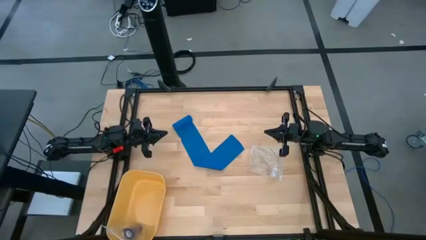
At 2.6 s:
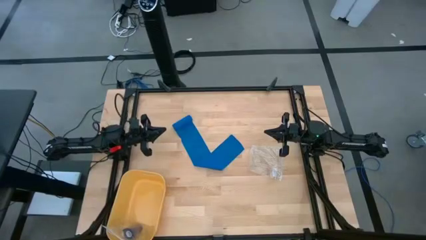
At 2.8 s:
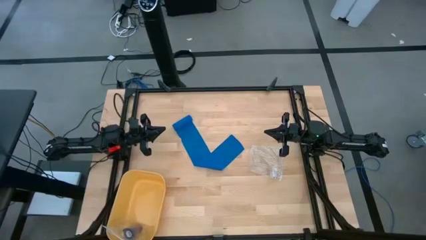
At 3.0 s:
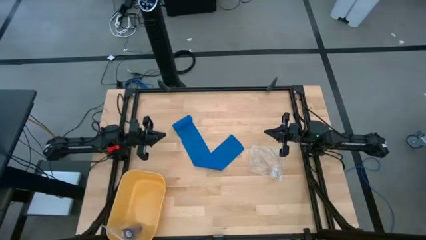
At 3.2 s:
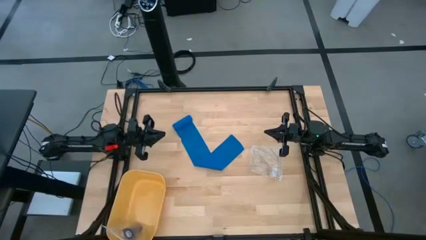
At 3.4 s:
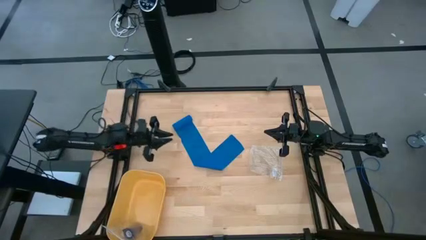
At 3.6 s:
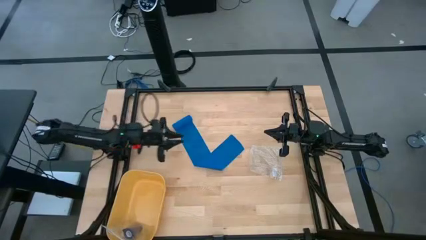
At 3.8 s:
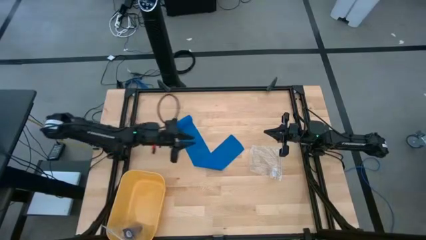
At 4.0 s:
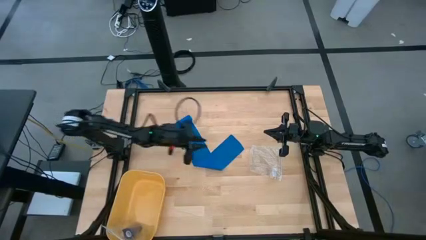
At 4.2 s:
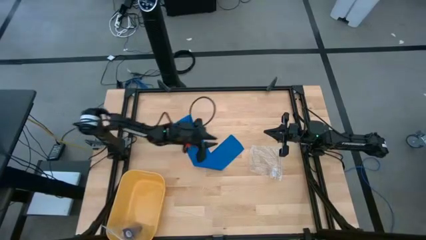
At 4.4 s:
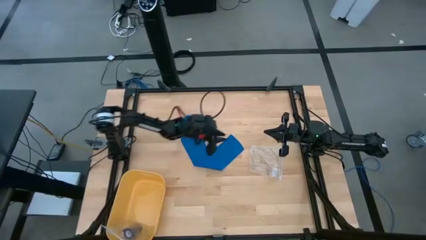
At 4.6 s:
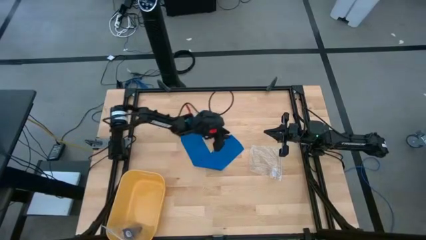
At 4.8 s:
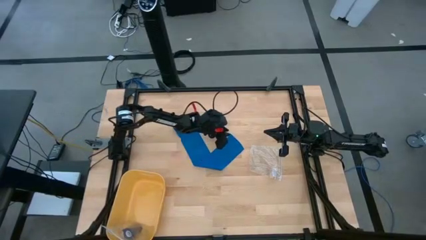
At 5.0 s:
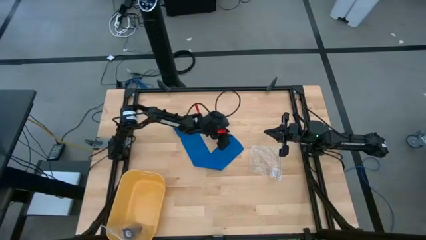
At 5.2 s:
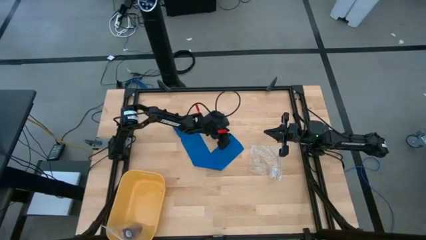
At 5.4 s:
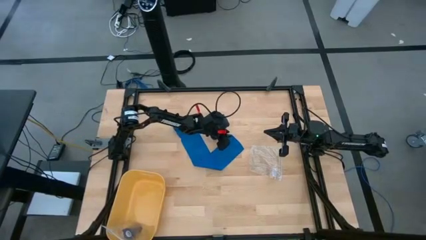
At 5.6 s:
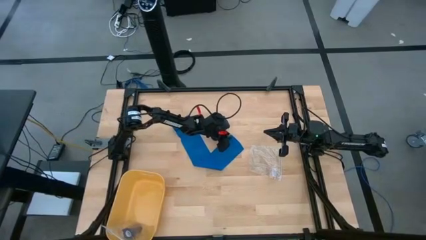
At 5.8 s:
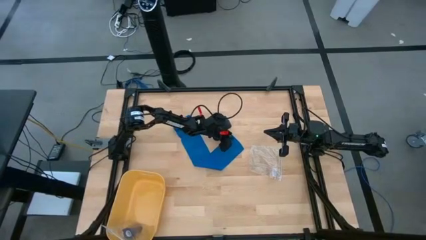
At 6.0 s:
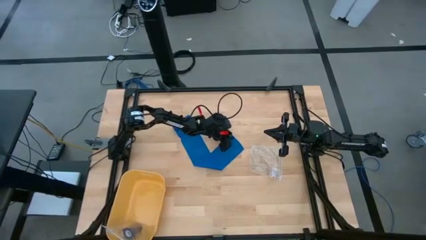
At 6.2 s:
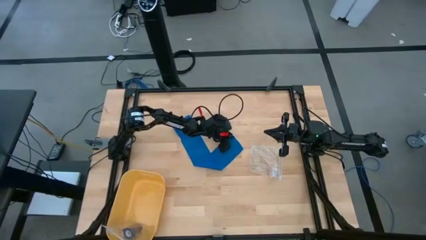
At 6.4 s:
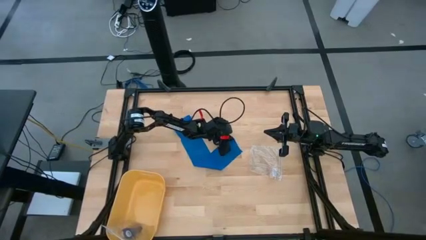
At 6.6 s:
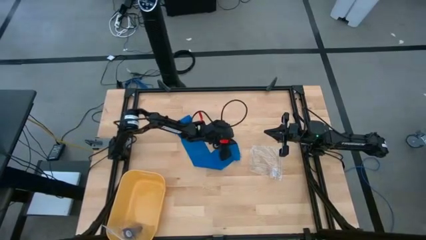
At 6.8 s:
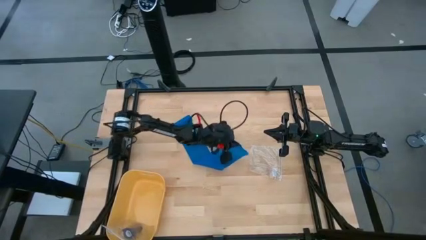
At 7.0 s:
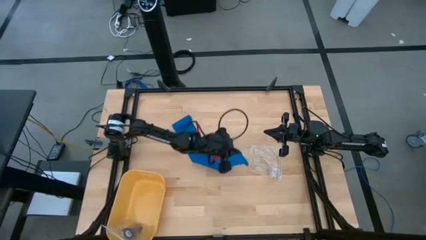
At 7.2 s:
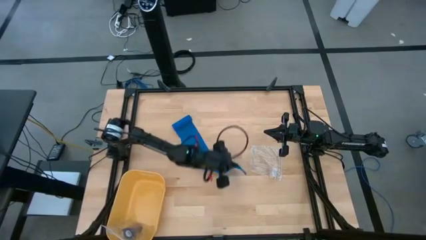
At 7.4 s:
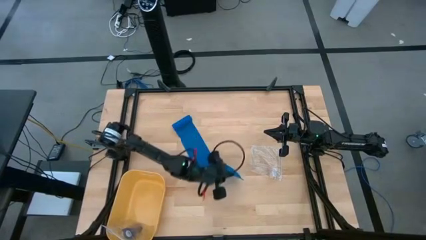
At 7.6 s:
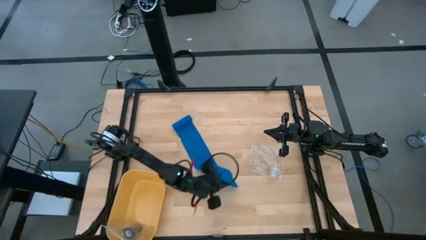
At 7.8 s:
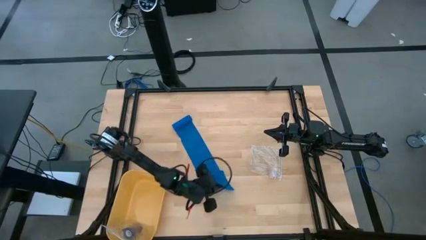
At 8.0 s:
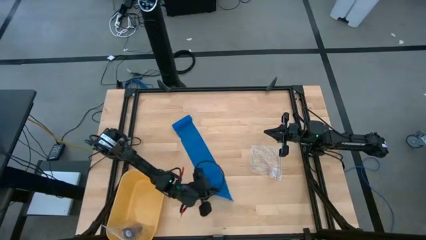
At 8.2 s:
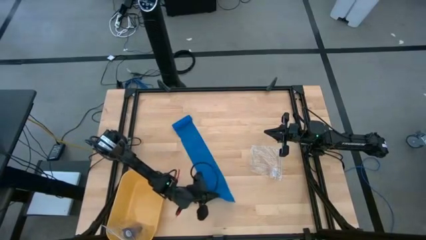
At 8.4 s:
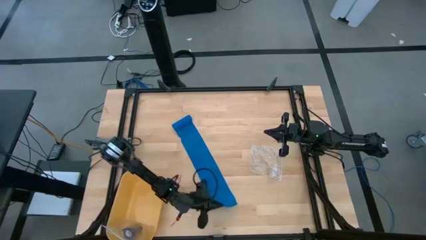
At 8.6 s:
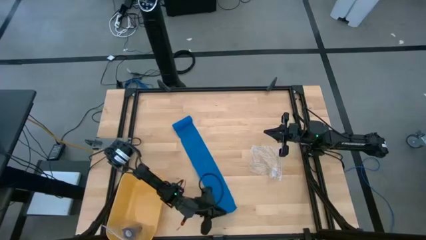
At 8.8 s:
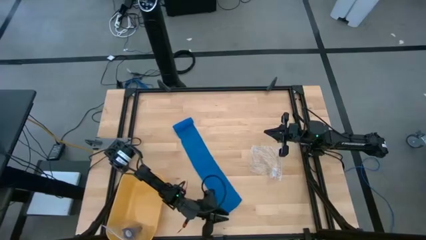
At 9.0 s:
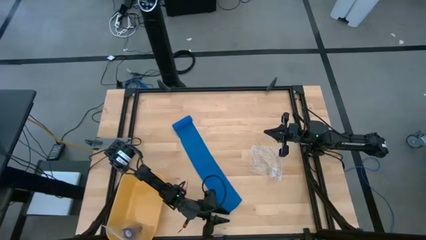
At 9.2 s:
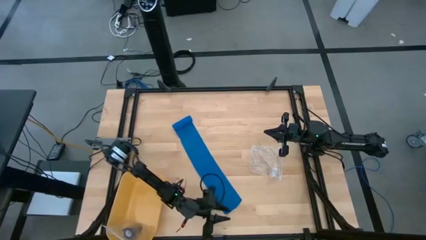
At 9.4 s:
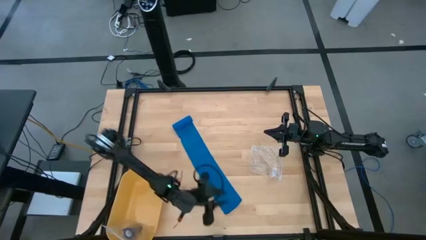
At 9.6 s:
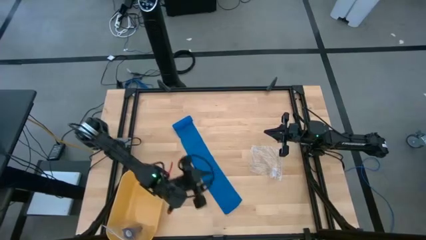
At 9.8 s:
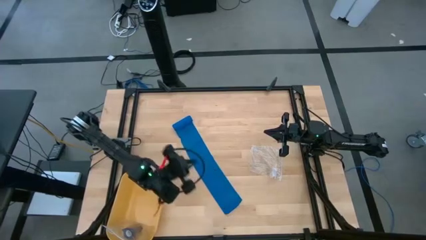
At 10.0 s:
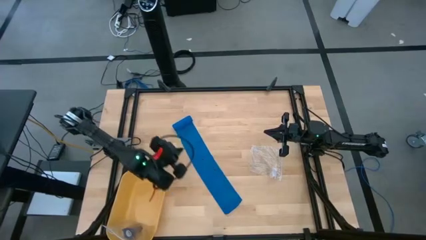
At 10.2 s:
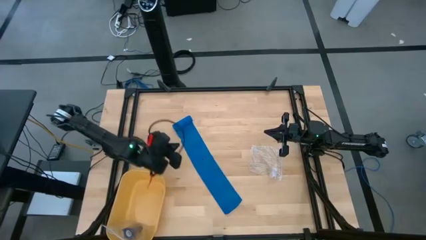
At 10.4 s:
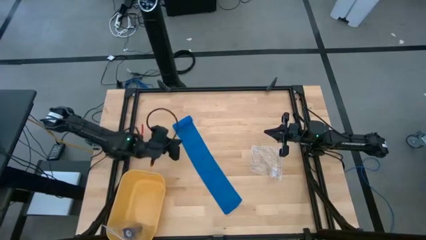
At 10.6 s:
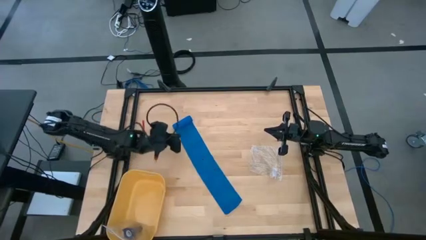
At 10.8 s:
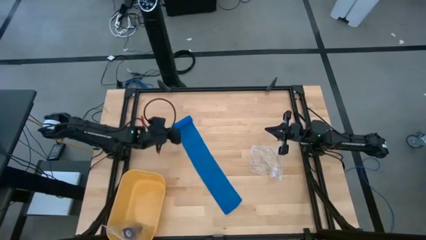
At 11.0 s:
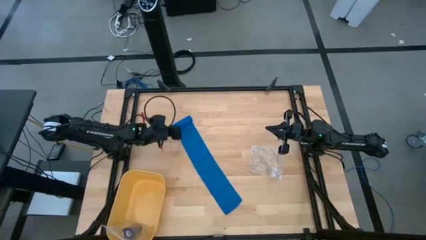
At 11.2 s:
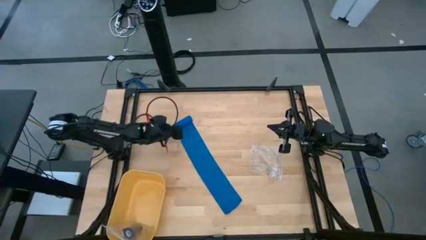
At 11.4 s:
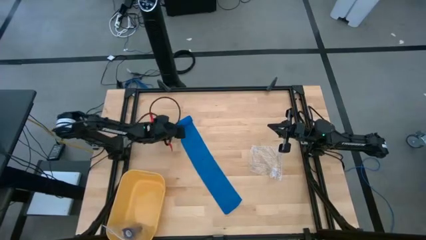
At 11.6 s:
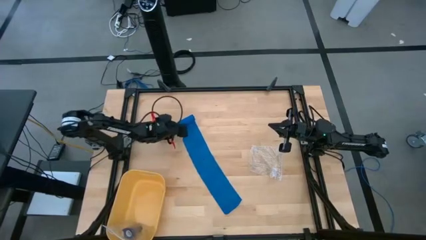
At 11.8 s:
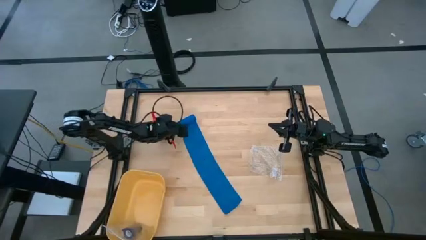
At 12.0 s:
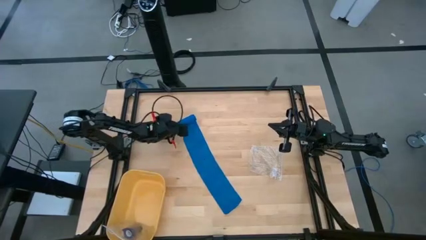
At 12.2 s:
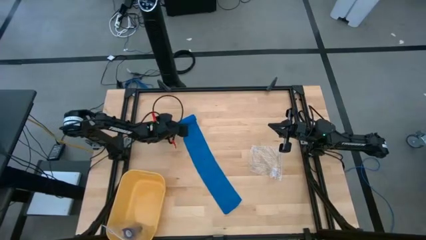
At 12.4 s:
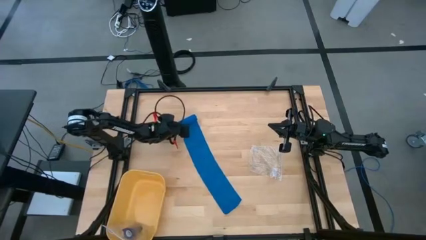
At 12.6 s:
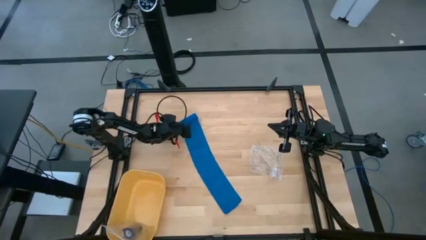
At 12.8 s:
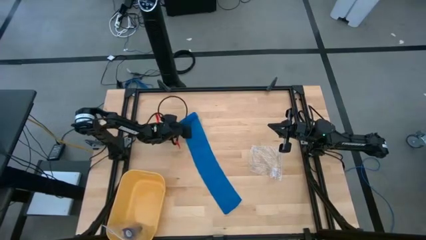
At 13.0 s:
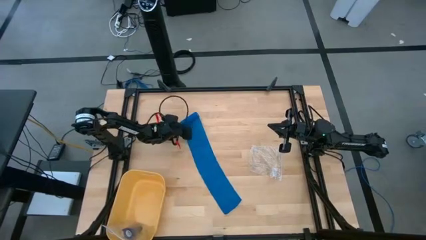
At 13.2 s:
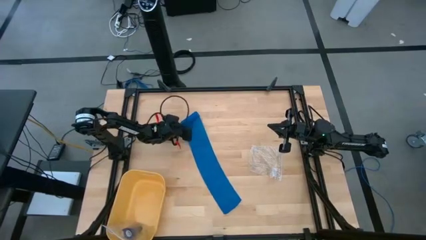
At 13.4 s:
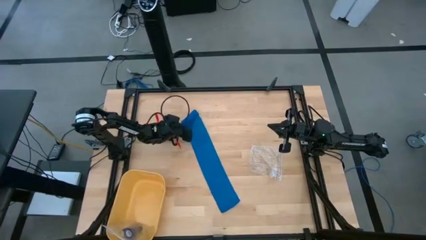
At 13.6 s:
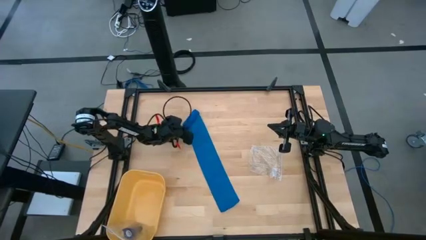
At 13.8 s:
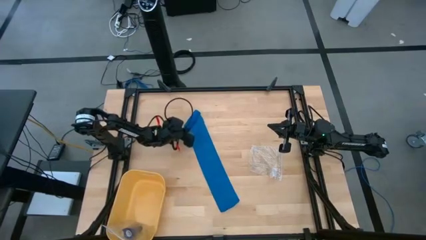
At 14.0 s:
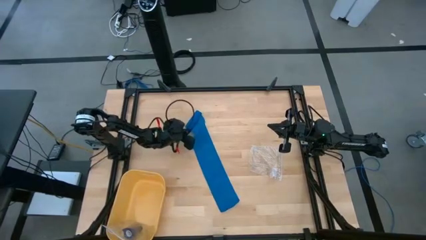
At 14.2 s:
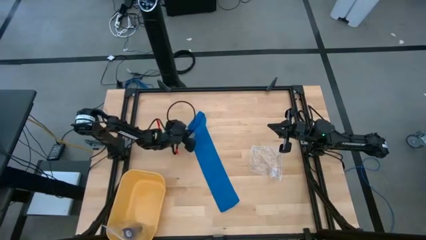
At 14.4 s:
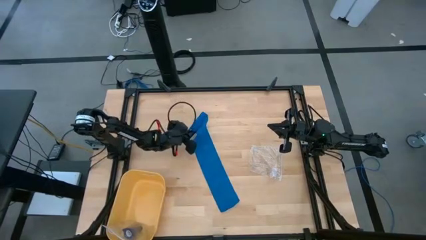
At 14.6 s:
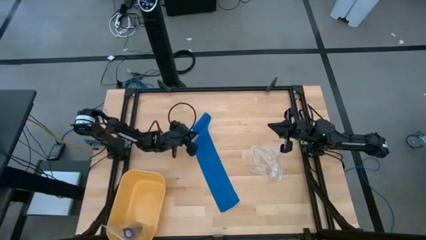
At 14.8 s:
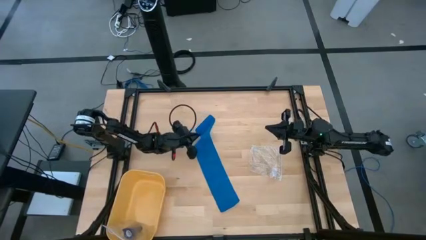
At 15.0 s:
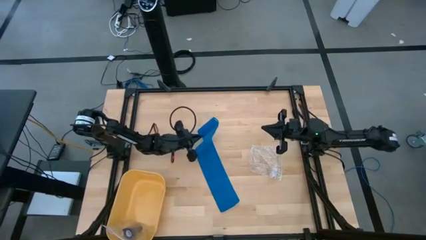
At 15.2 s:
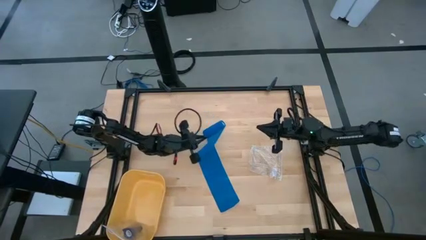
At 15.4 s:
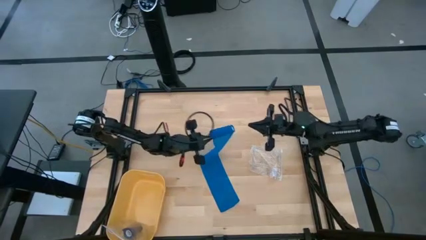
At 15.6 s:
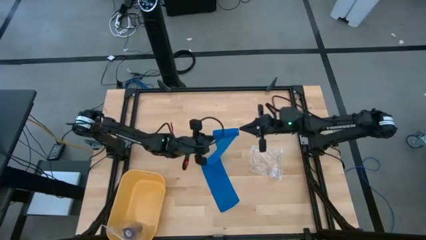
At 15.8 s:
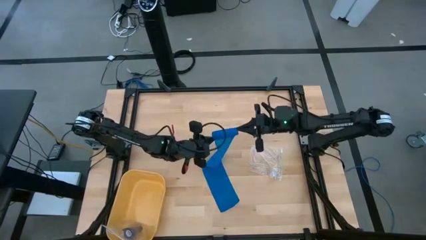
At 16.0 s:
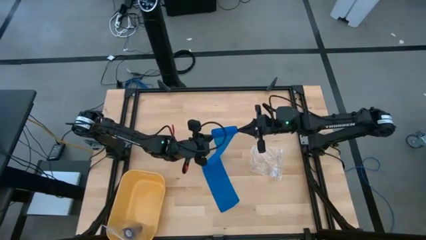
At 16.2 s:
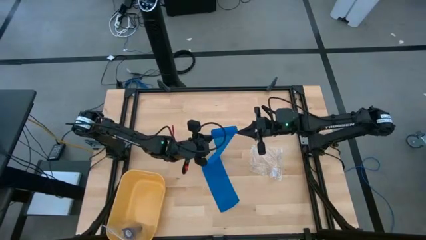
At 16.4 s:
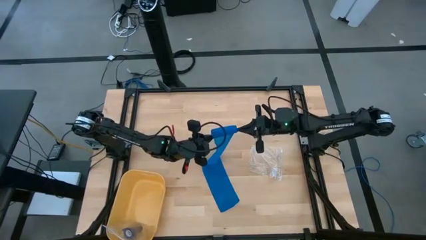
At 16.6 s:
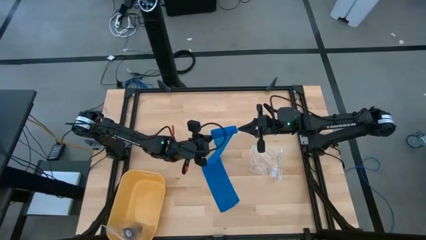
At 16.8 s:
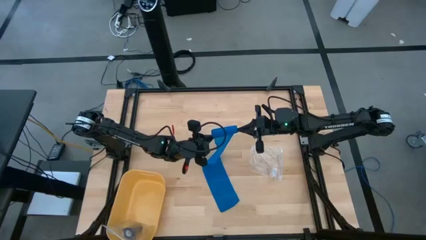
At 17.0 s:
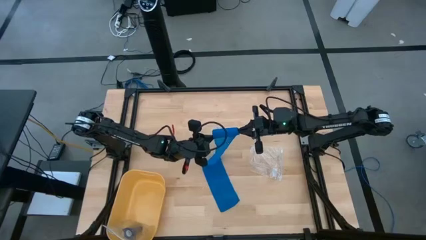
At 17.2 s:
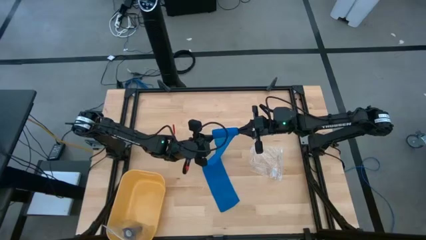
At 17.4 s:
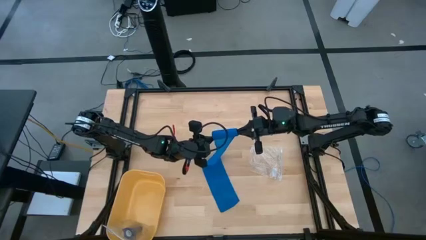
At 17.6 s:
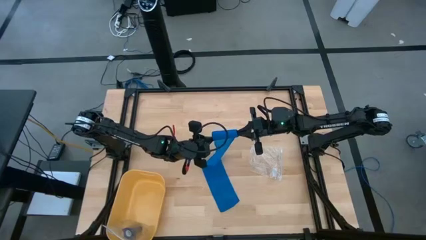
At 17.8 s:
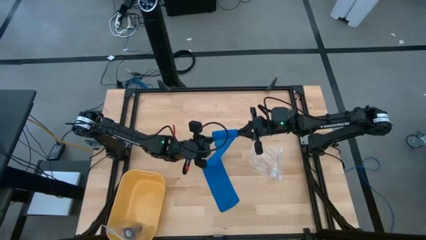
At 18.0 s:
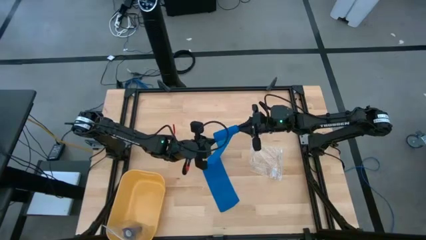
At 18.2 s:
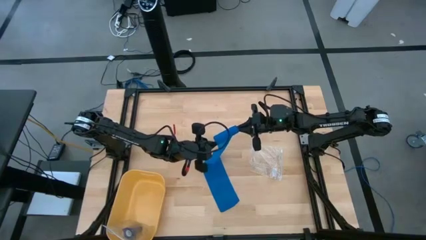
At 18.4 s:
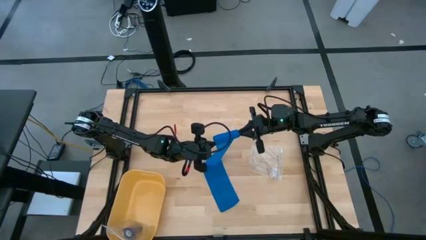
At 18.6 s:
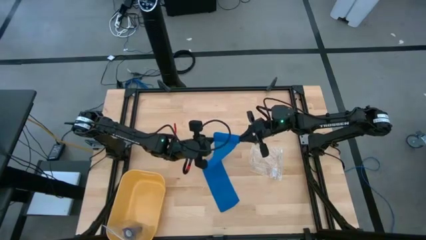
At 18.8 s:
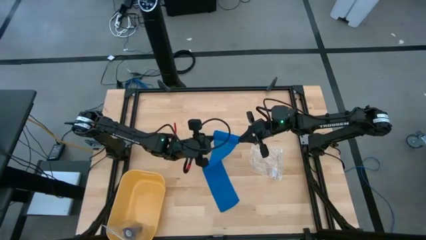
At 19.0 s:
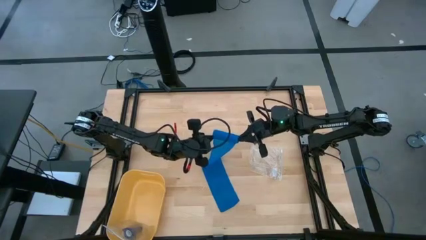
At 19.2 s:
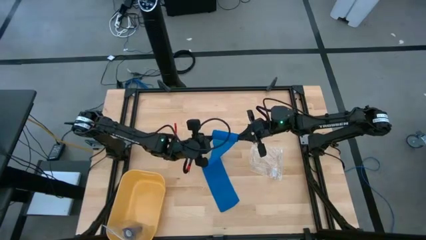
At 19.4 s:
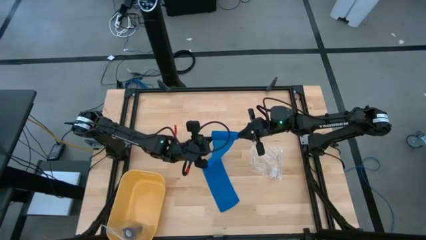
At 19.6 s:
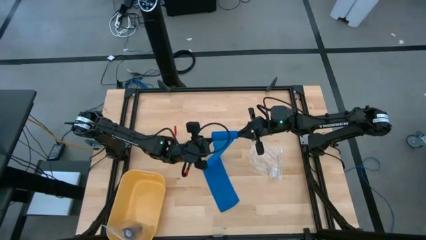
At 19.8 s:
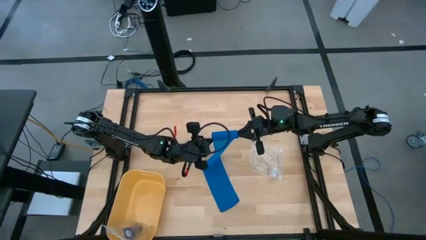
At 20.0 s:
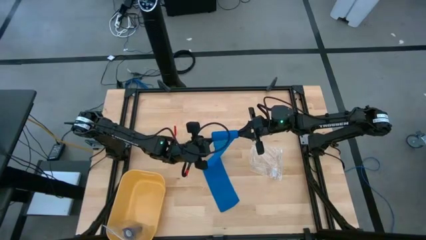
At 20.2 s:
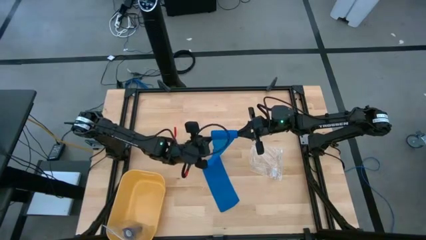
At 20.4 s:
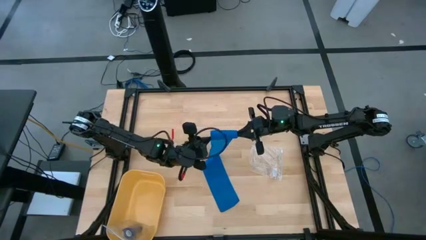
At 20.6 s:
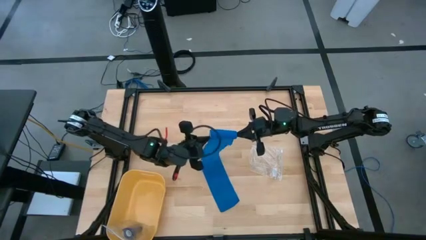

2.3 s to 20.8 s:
Task: Roll bandage
Roll the blue bandage
